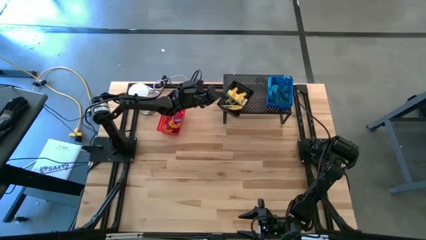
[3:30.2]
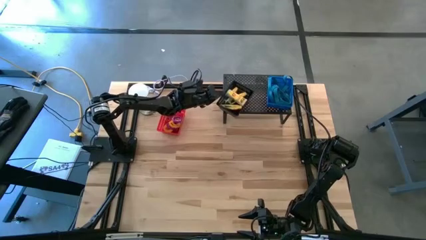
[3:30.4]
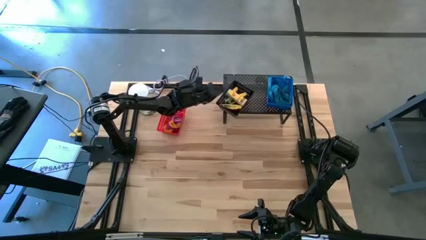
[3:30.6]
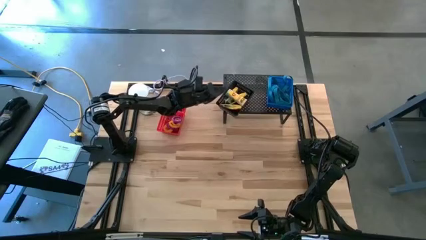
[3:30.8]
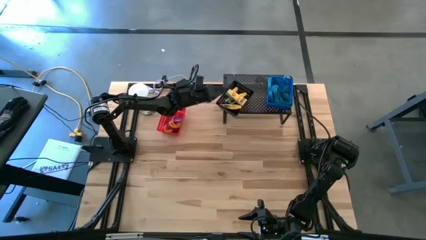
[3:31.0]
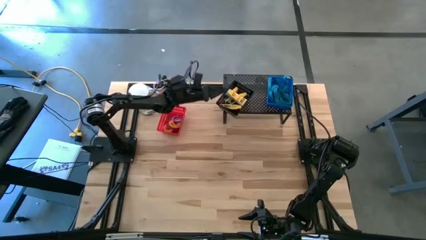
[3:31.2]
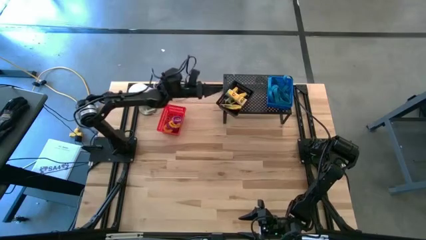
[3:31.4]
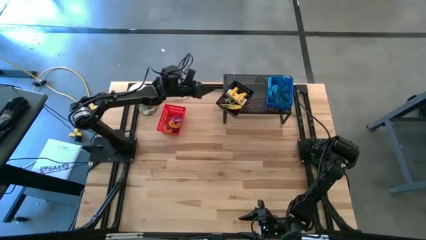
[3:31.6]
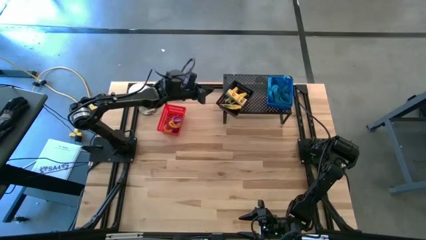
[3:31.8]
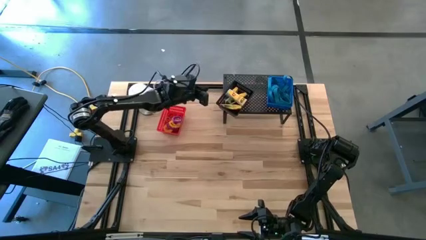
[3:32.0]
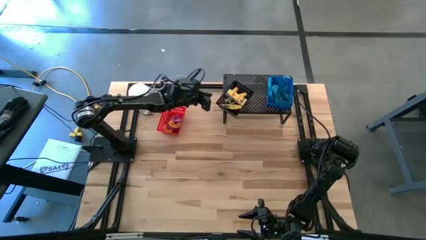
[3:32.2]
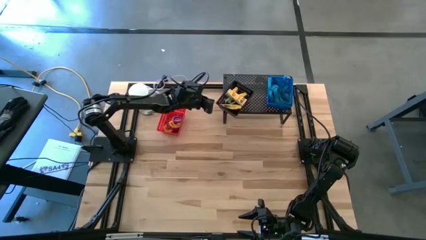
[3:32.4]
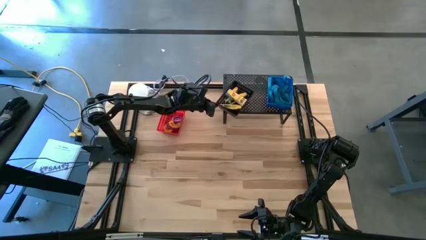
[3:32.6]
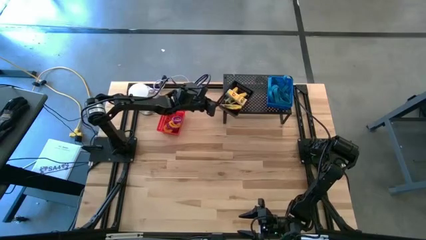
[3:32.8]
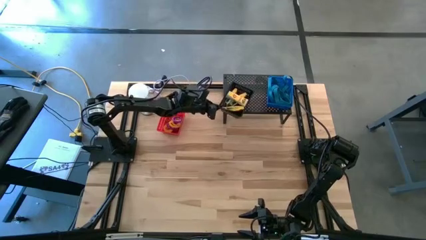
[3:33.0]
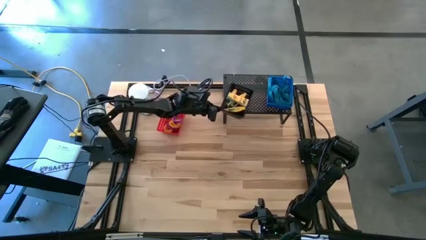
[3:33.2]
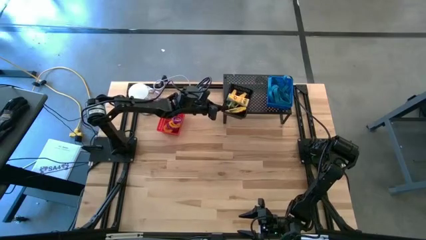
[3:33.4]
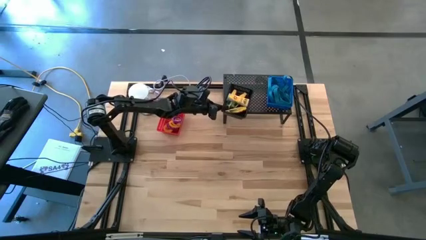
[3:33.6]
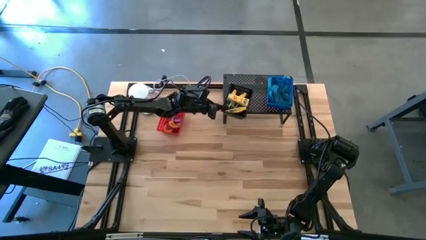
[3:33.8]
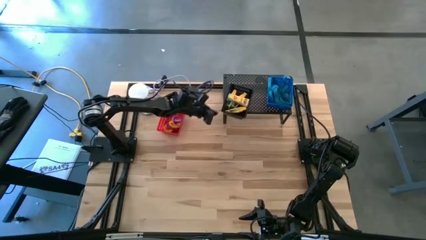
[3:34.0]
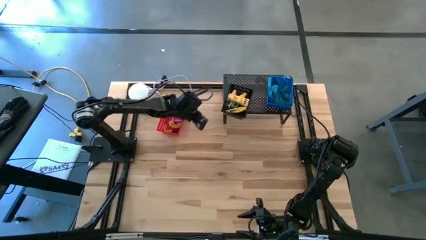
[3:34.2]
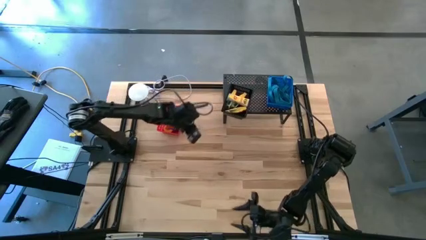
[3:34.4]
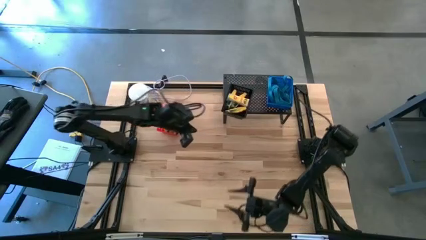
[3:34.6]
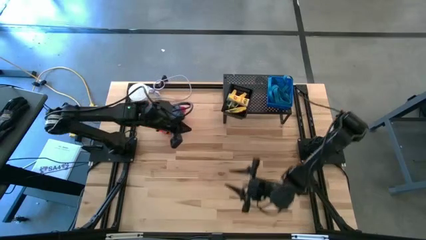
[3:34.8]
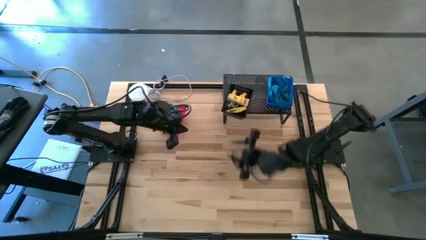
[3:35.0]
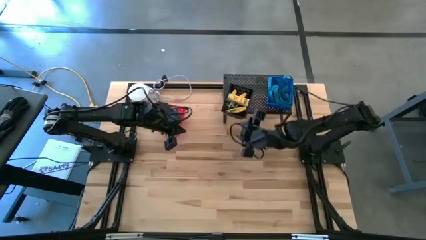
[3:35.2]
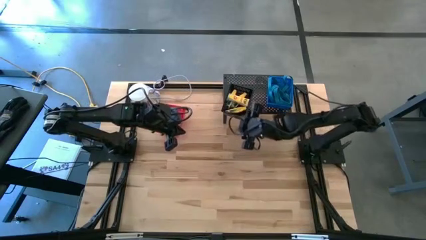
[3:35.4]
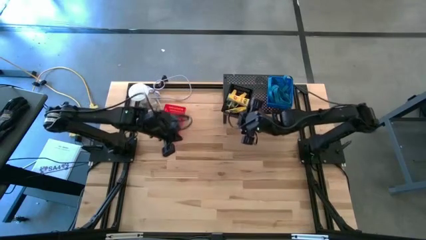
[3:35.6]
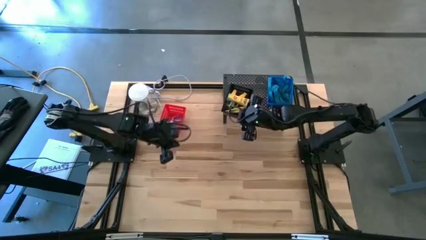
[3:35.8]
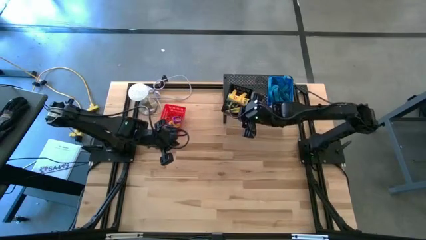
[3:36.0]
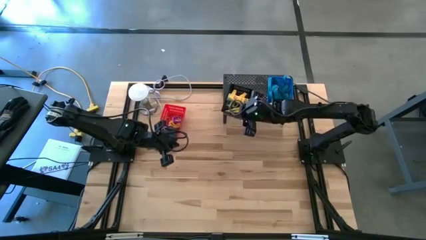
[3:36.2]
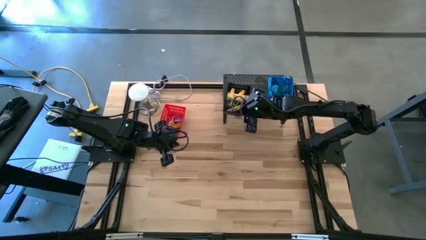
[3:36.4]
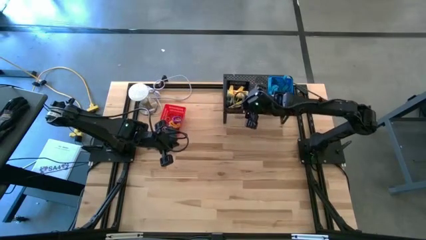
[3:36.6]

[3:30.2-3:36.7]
Task: Pick & Place Office Desk Supplies
Adjust the black bin on the shelf

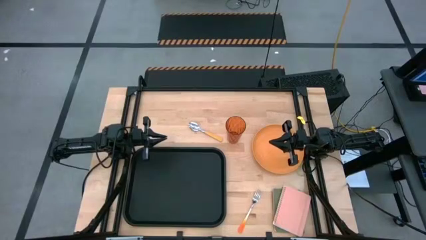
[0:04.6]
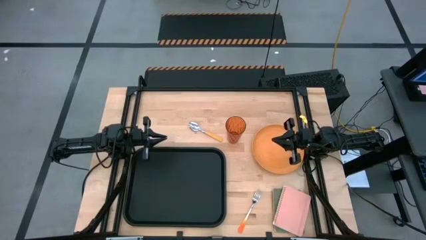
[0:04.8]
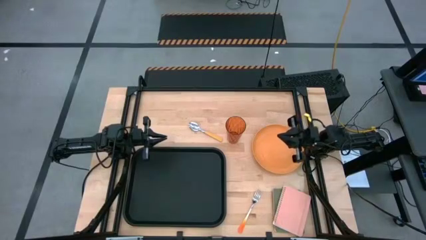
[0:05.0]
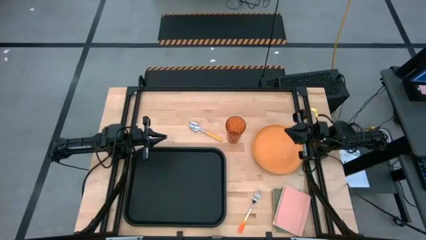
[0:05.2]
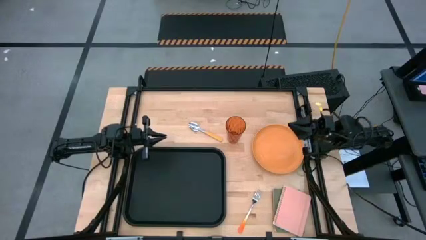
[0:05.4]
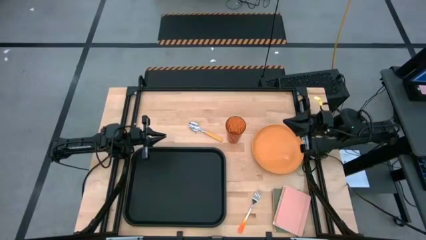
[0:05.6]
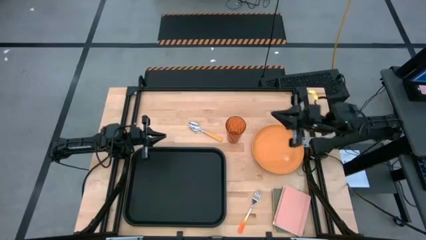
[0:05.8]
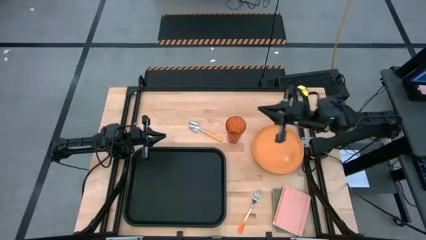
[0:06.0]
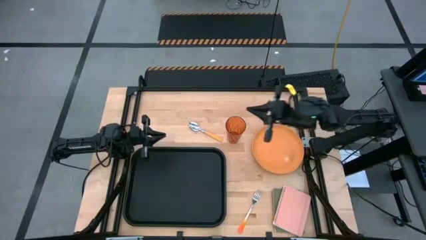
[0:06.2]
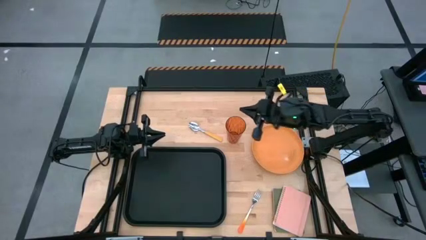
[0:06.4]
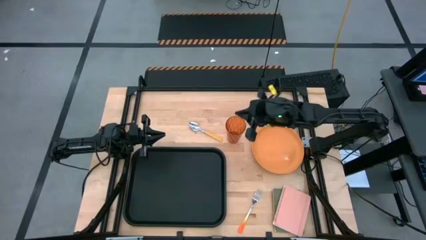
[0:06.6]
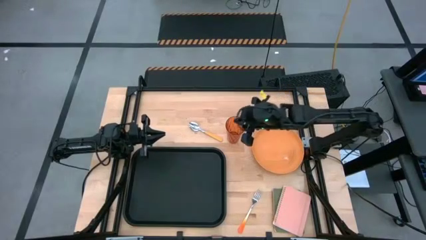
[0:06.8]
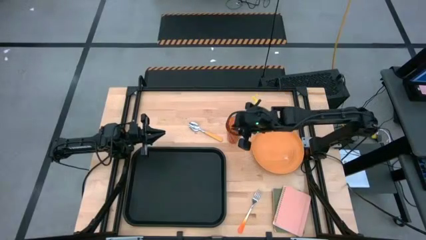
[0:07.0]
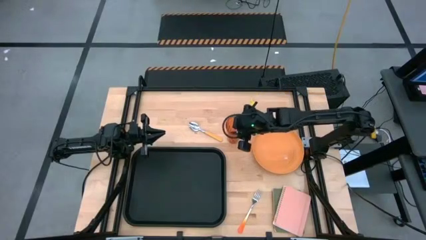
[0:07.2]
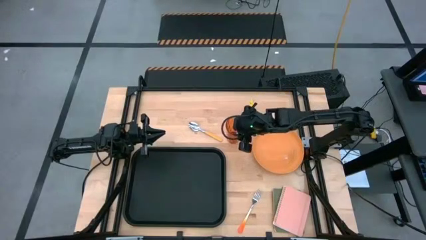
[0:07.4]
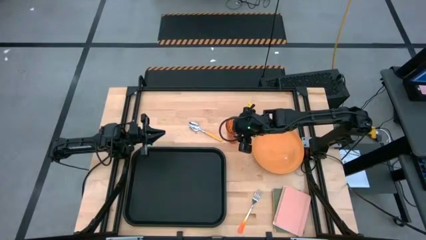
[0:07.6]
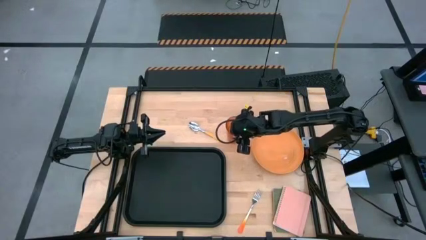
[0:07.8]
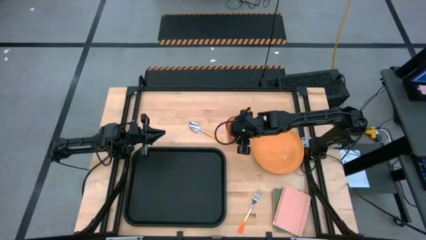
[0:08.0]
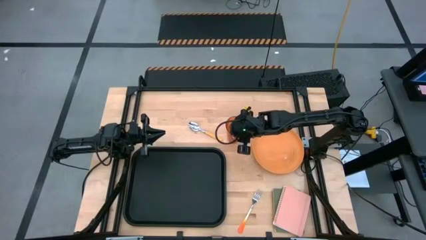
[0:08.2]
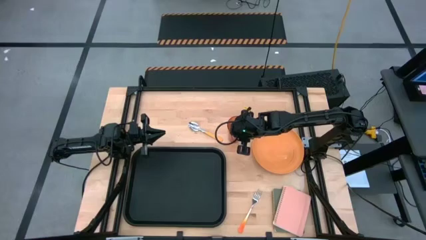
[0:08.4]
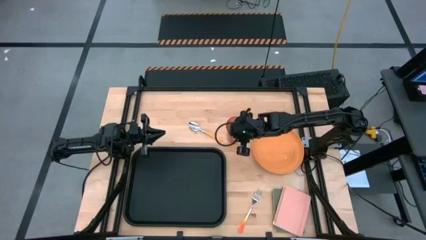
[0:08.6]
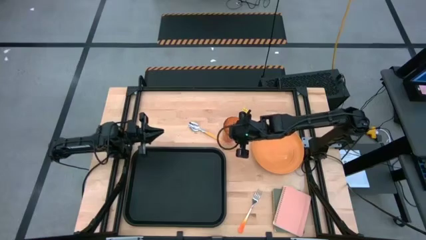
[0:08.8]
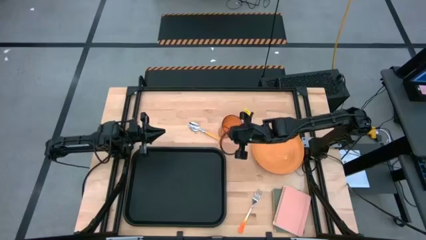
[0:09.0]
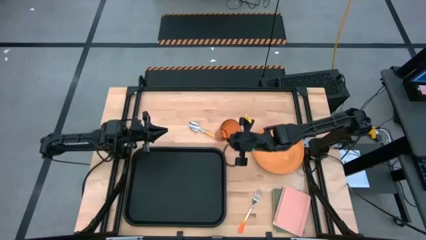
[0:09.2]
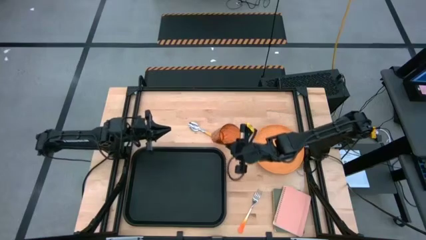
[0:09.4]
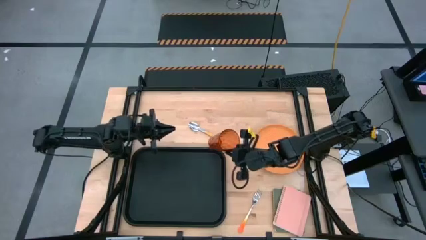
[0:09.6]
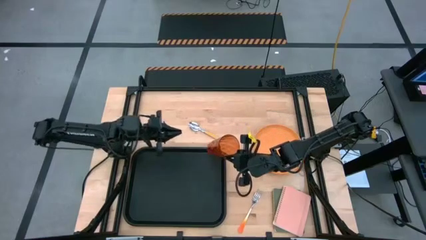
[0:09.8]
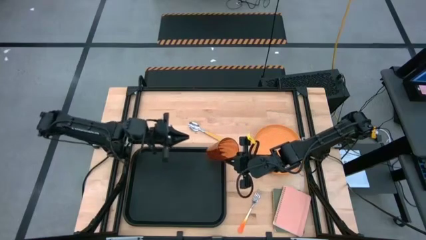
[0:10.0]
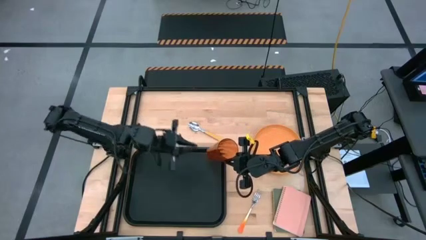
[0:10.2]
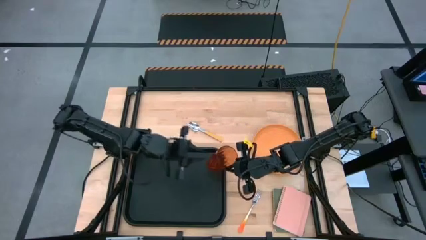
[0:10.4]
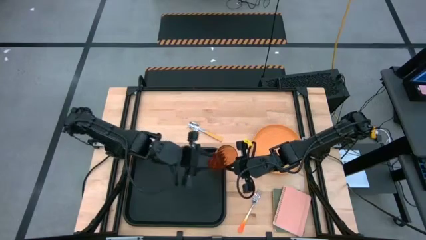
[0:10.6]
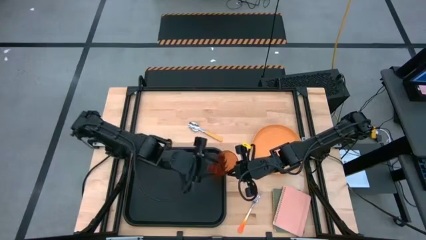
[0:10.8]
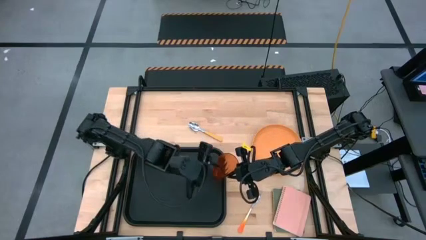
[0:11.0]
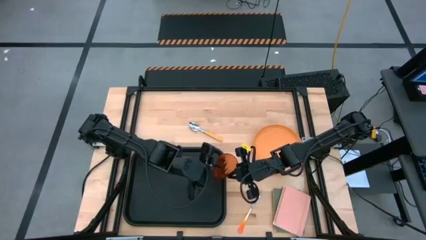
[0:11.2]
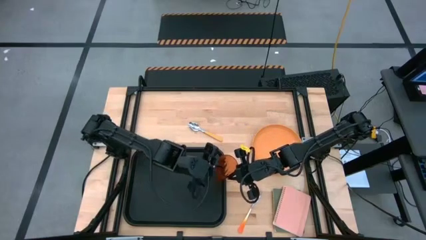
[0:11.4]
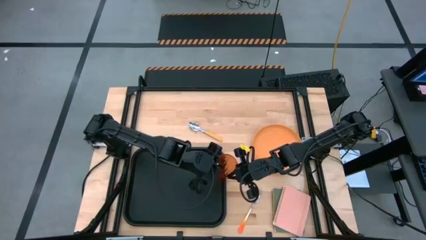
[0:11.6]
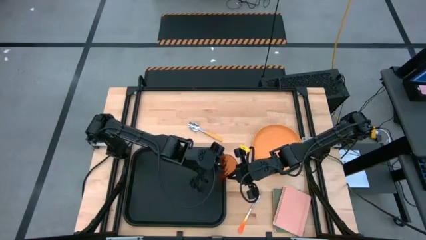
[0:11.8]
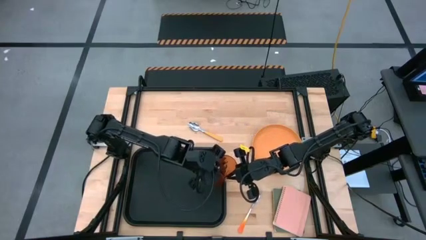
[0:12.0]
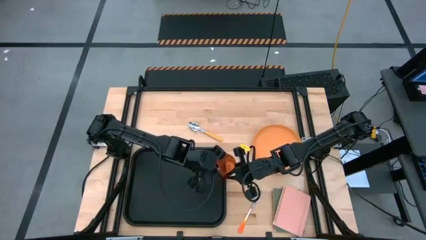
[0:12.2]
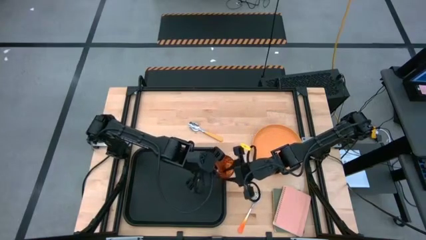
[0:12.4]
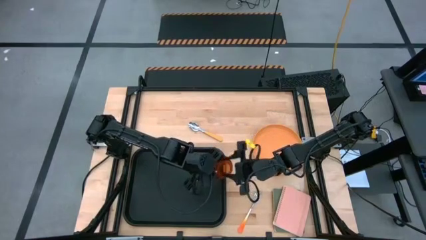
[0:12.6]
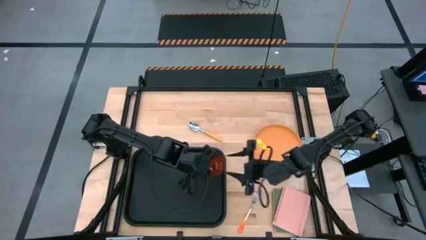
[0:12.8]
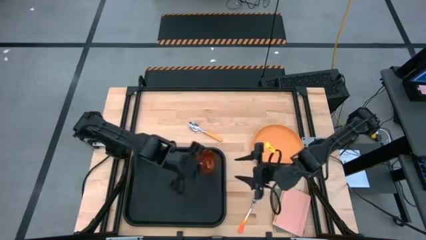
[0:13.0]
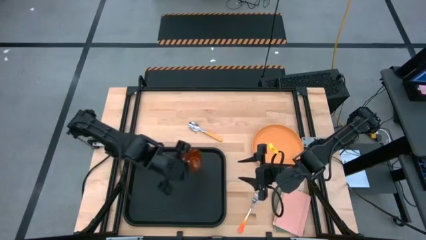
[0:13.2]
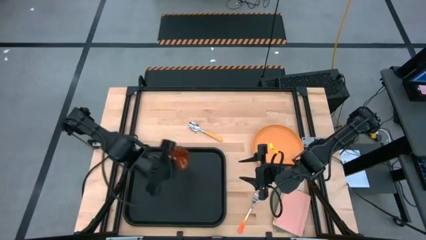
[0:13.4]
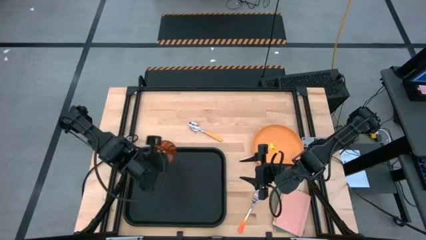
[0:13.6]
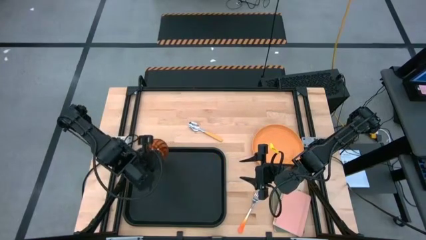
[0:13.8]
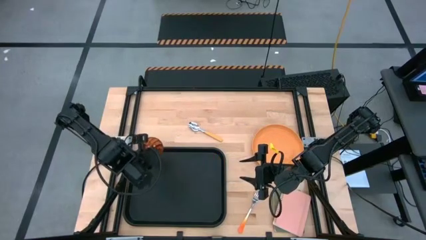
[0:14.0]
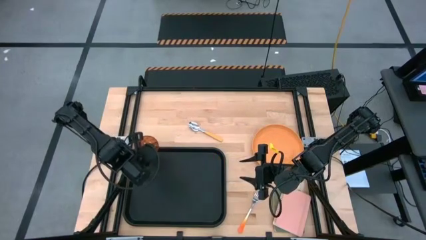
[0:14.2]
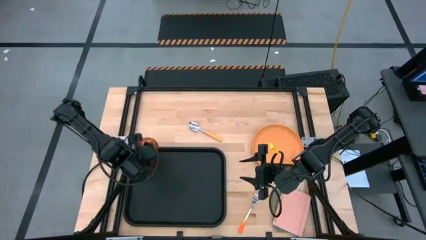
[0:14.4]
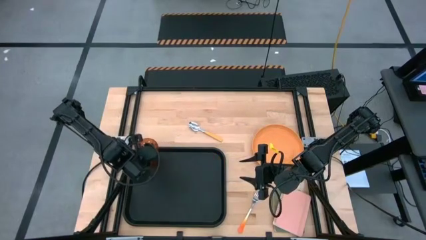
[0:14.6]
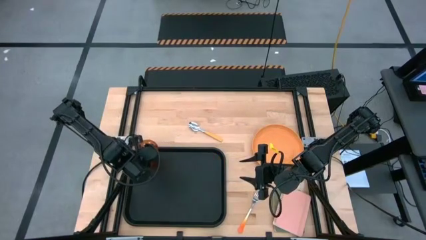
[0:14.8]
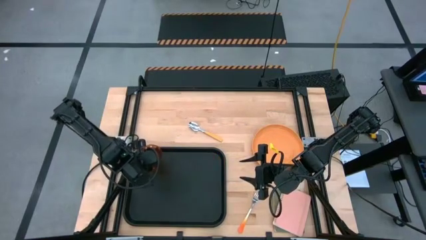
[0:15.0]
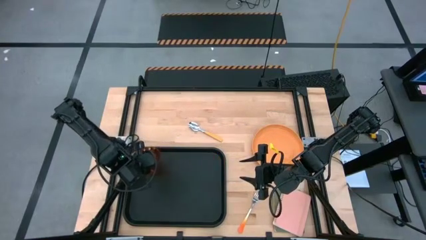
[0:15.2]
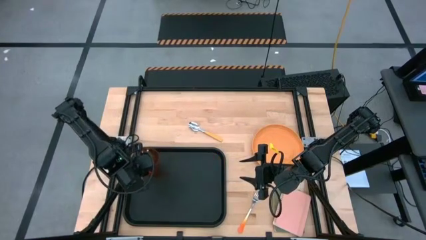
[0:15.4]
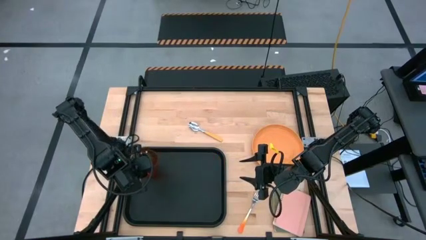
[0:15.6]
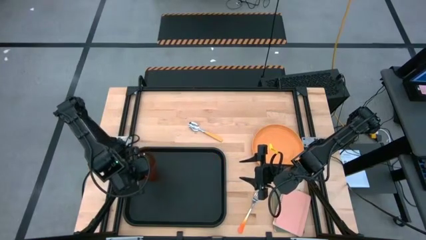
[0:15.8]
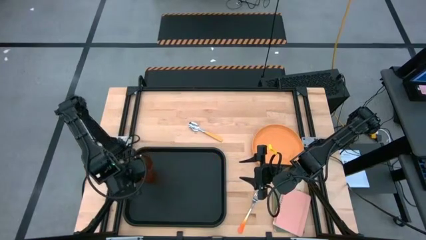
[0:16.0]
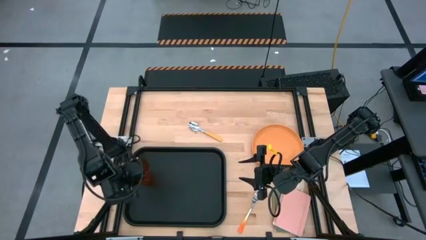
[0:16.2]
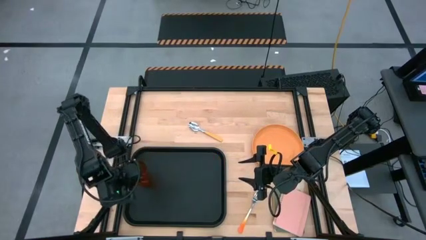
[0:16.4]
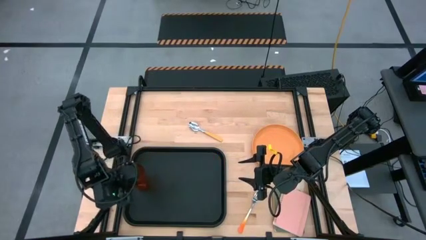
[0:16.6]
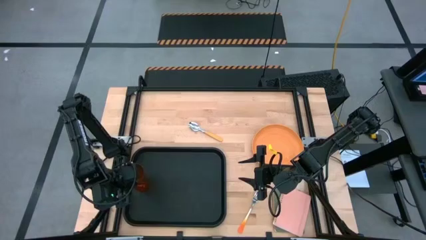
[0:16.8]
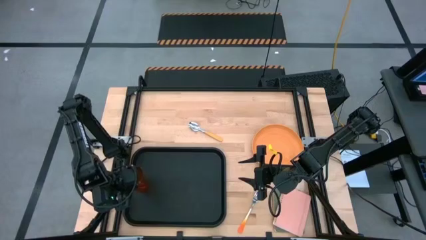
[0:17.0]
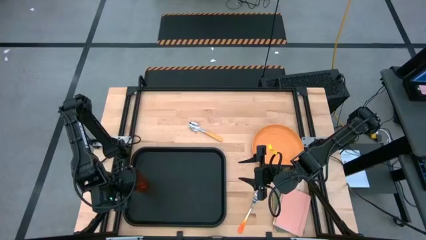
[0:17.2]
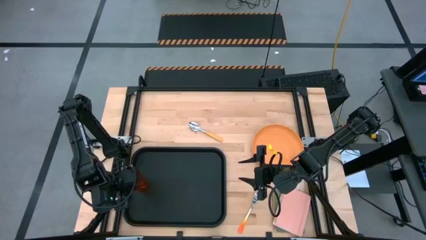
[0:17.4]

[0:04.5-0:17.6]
Task: Pick and place plate/cup/fork/spoon on tray
Put the brown cup on the black tray
